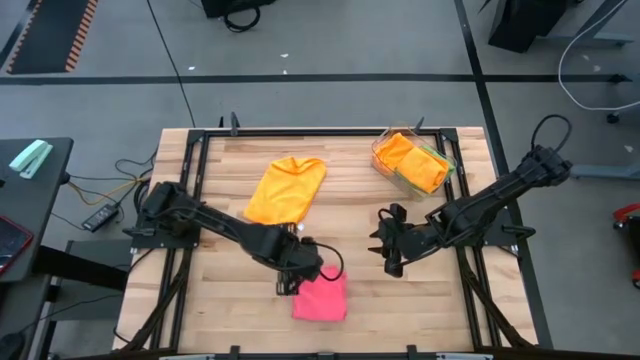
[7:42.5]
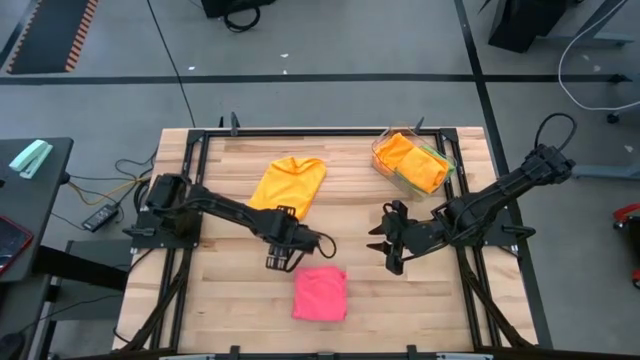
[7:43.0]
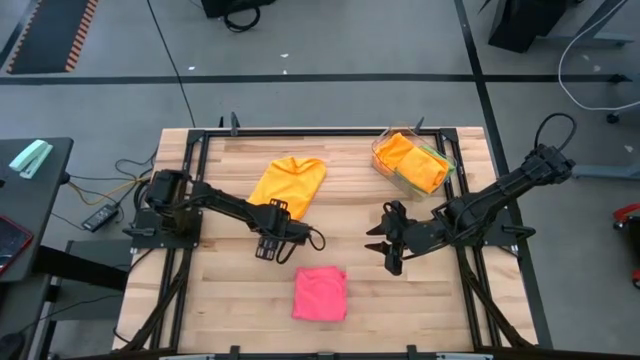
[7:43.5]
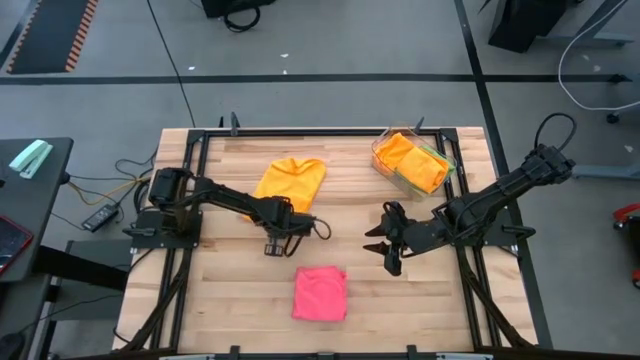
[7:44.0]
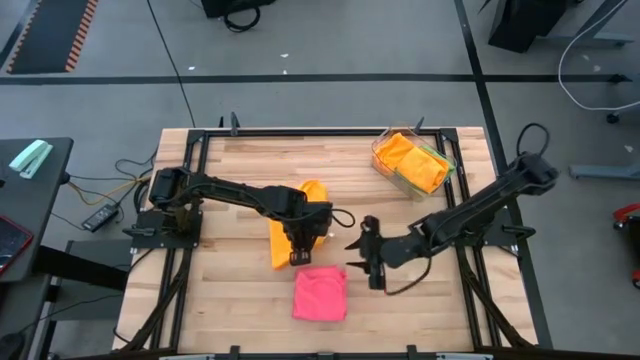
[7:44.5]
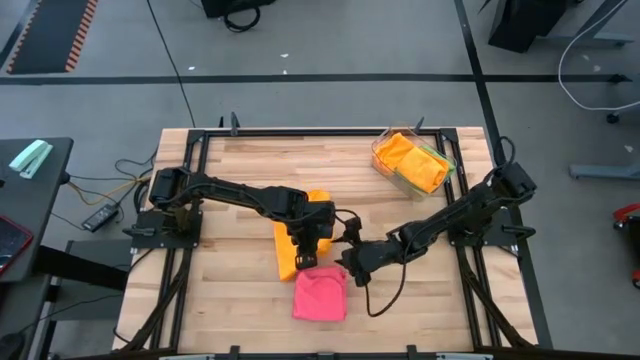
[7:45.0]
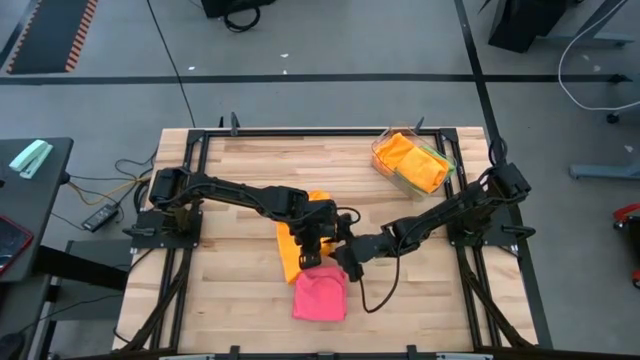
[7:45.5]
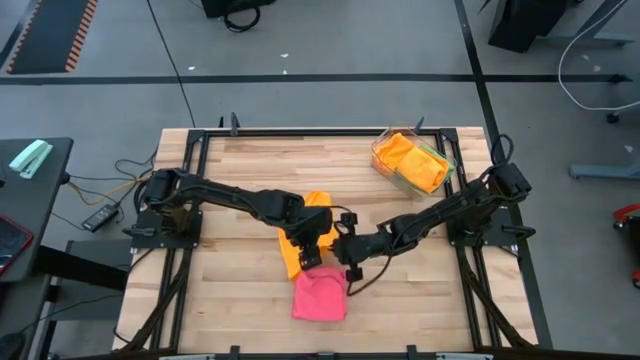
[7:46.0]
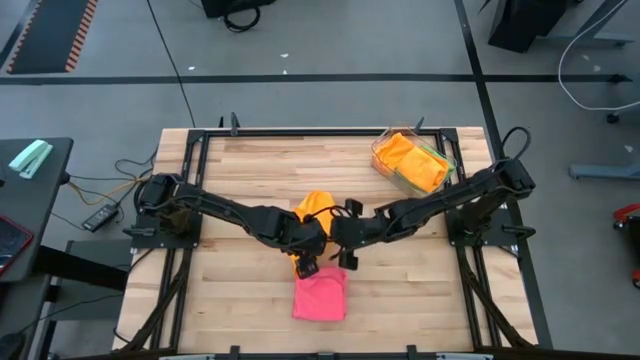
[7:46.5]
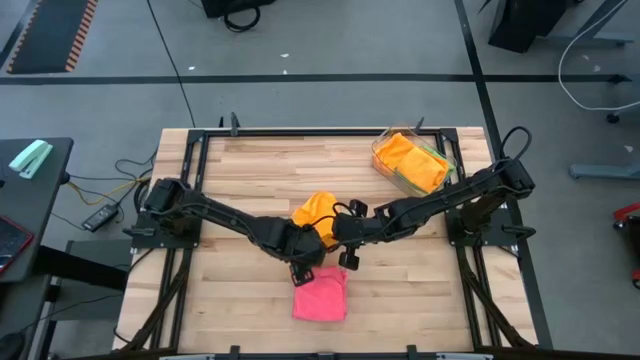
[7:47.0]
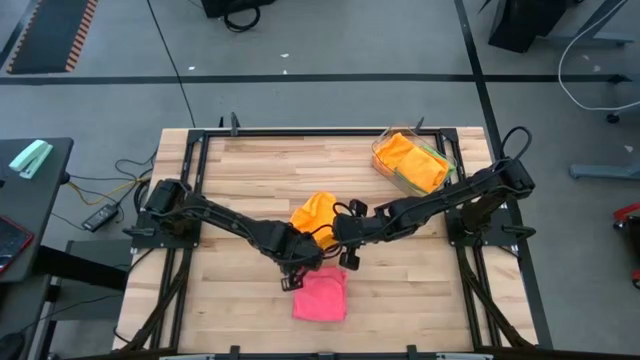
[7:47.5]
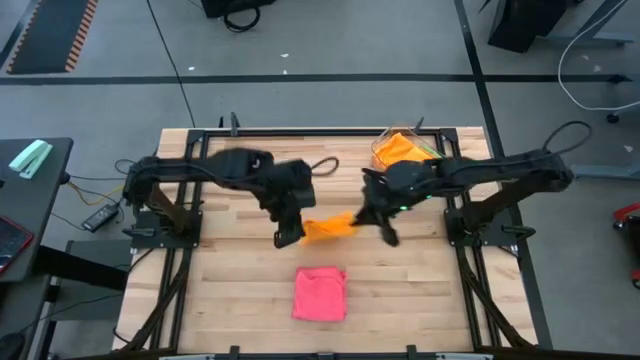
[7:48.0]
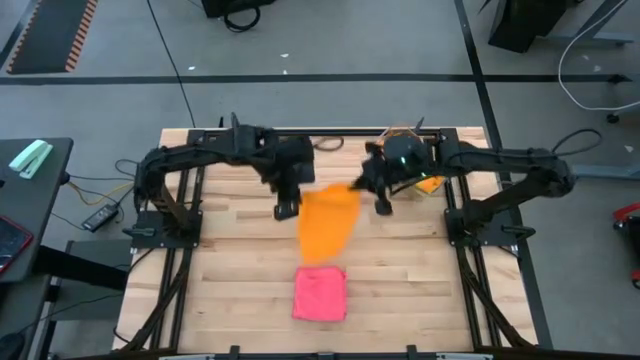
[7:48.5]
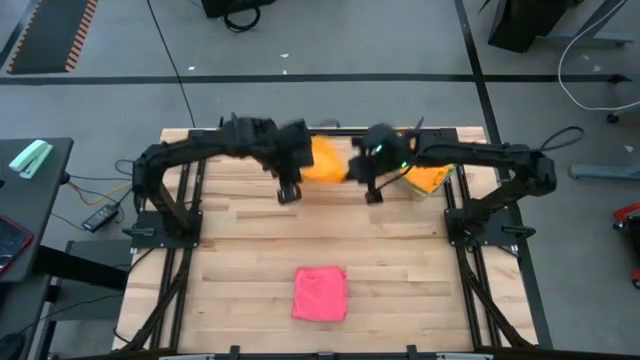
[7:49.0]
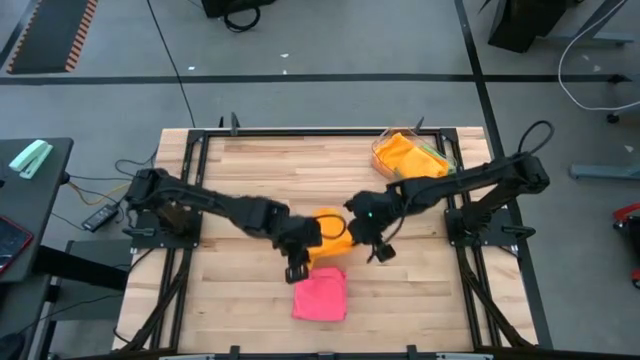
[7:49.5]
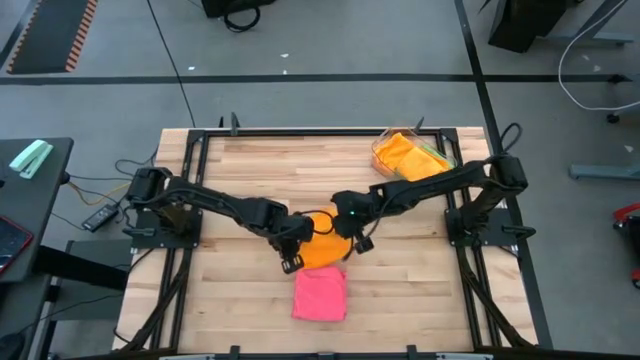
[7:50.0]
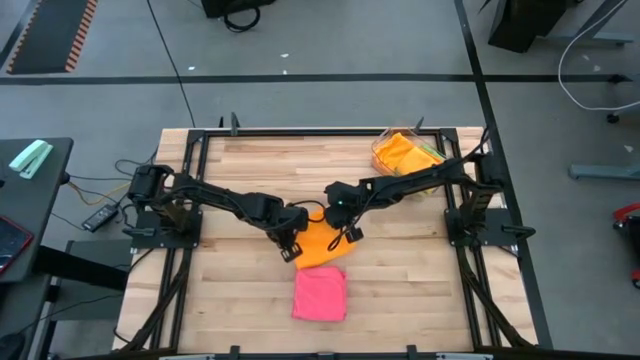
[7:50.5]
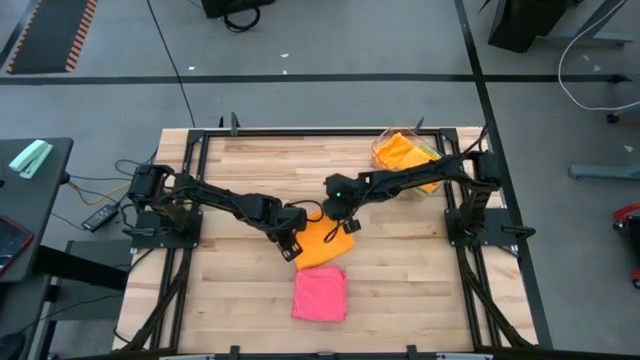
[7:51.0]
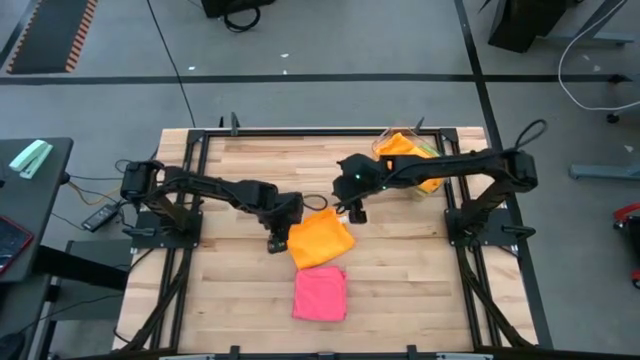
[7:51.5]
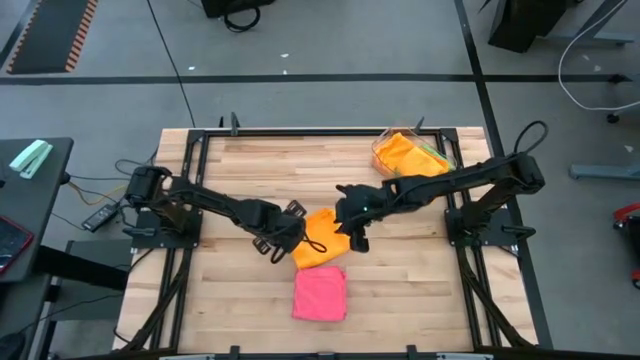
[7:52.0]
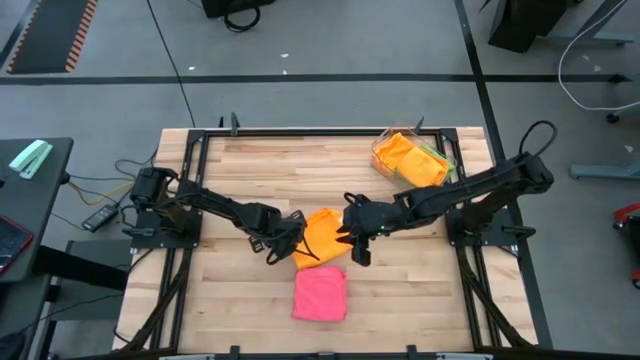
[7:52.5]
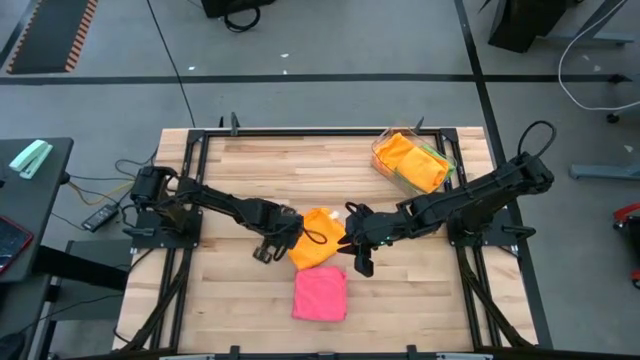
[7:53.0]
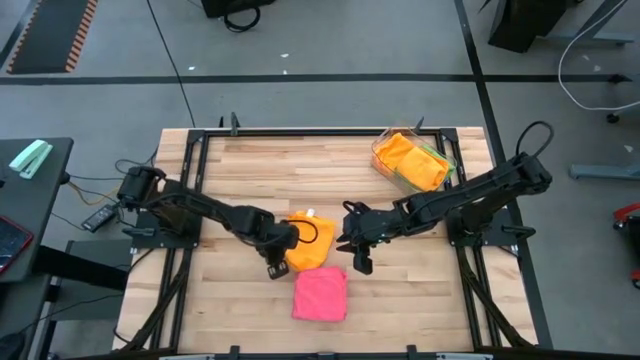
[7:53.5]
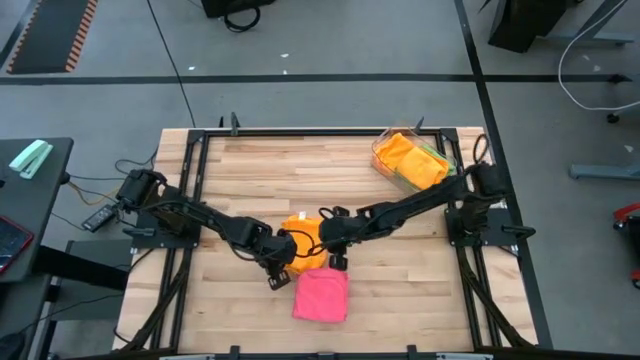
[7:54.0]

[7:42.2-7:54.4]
Task: Fold microfiber towels
Fold the orange towel

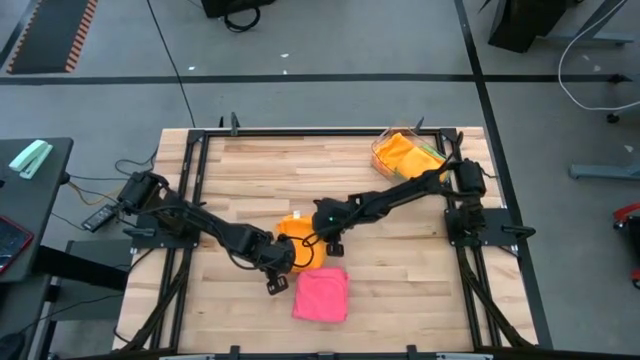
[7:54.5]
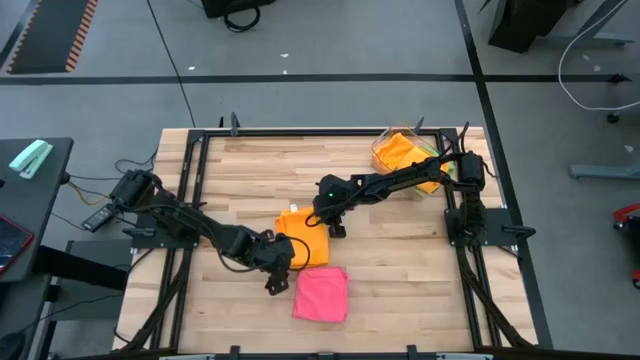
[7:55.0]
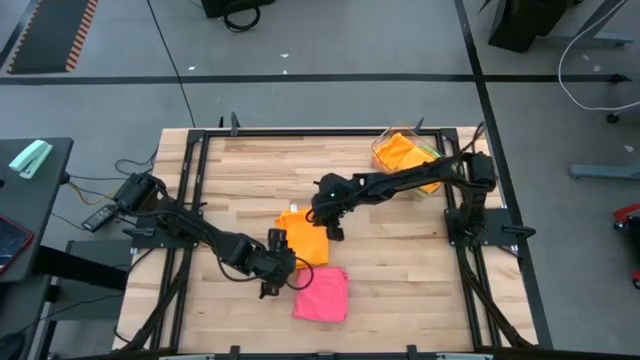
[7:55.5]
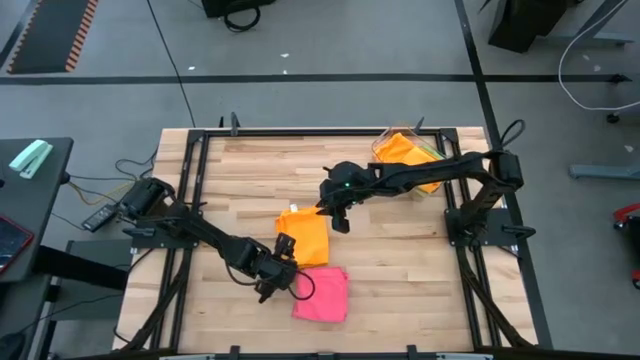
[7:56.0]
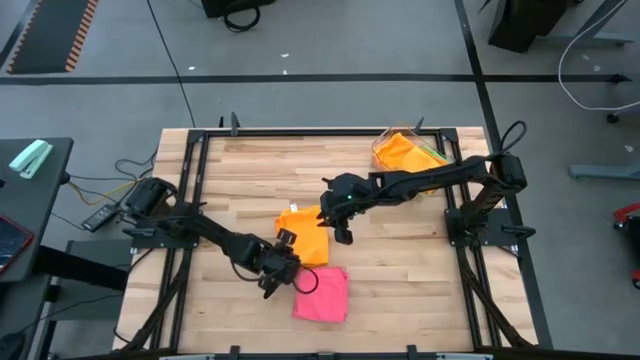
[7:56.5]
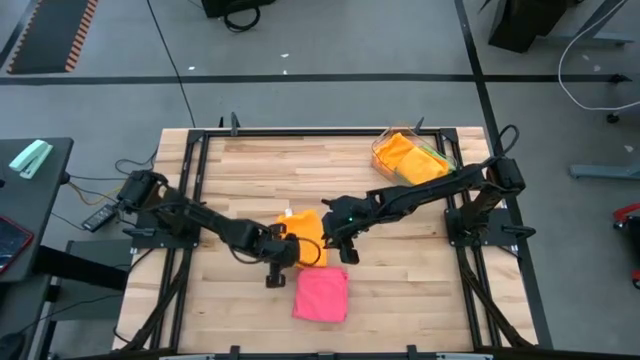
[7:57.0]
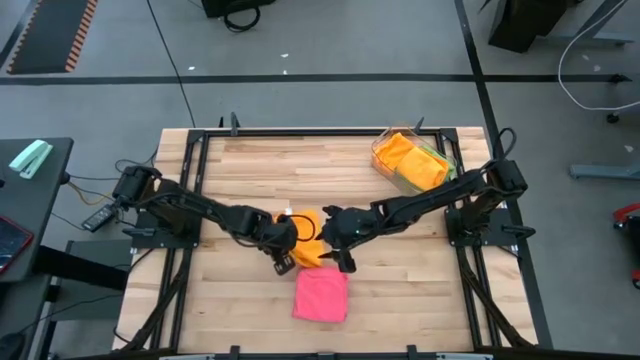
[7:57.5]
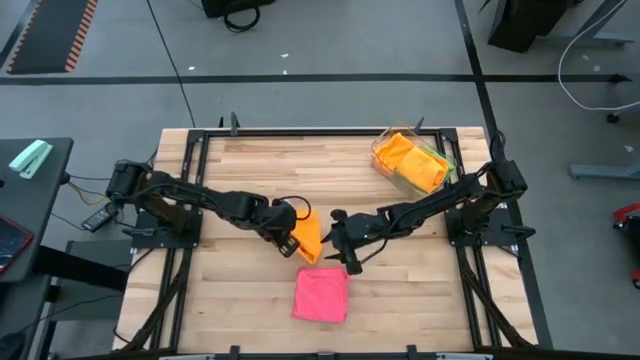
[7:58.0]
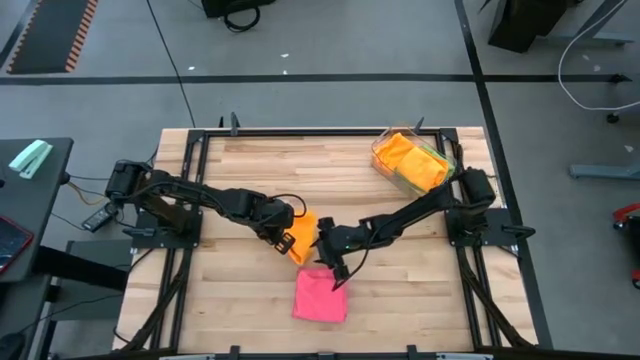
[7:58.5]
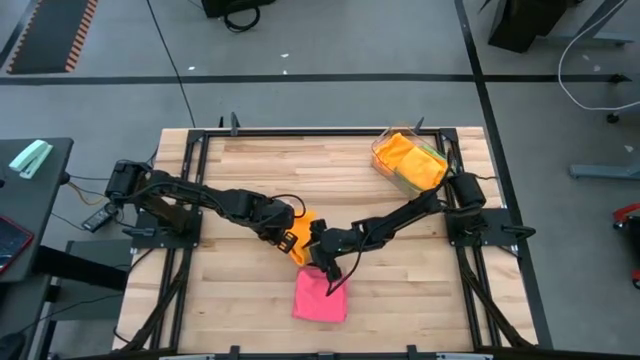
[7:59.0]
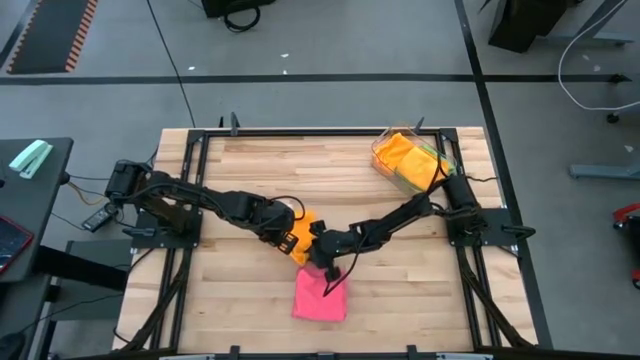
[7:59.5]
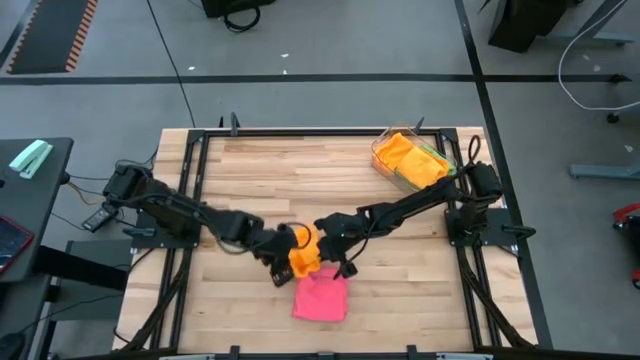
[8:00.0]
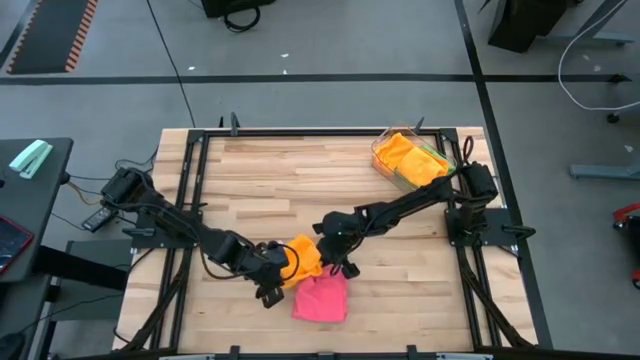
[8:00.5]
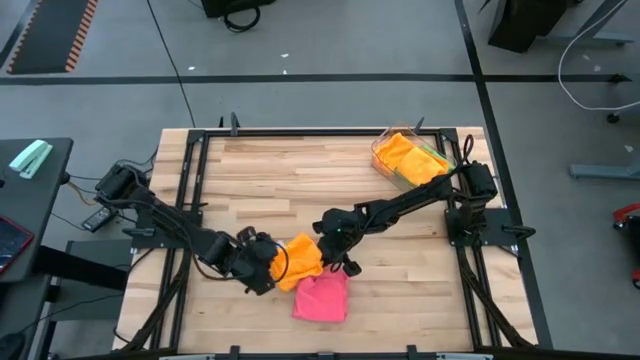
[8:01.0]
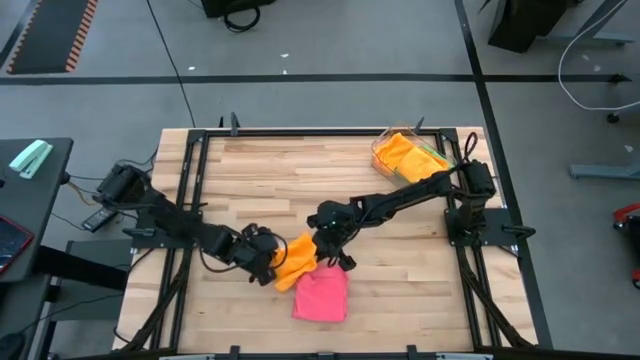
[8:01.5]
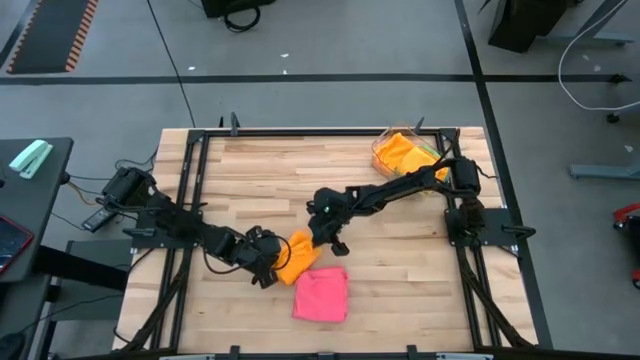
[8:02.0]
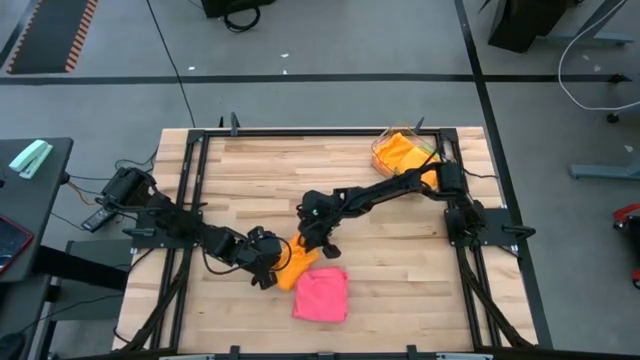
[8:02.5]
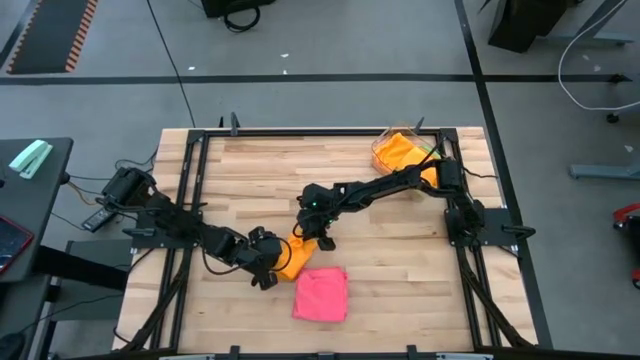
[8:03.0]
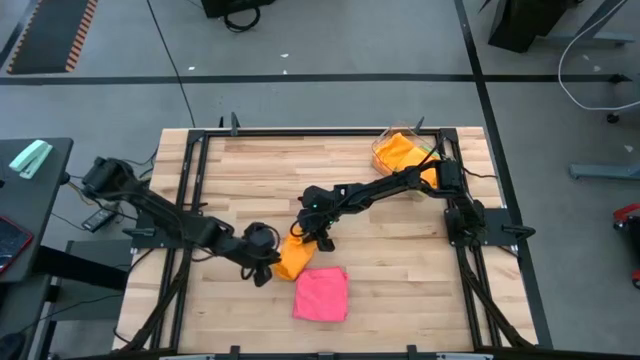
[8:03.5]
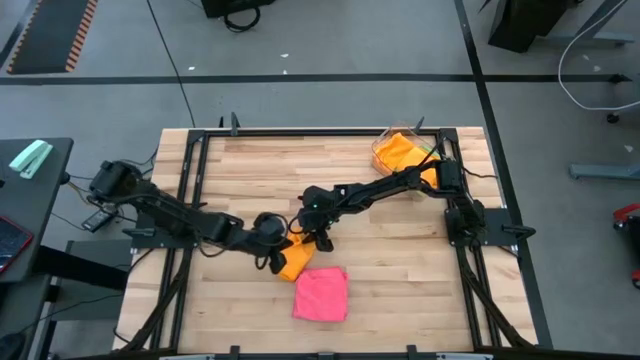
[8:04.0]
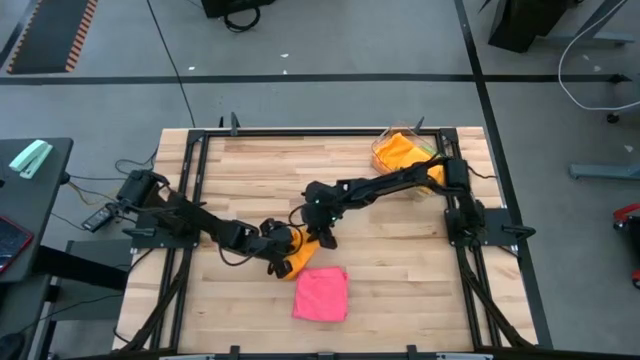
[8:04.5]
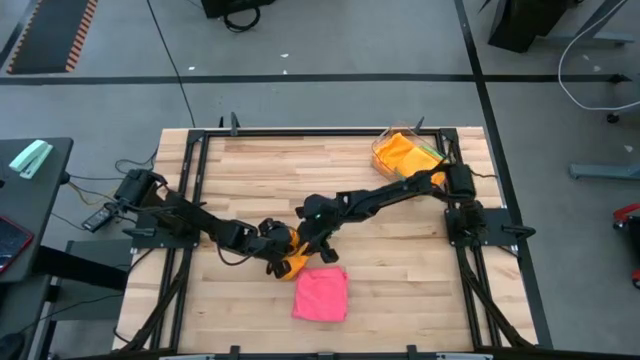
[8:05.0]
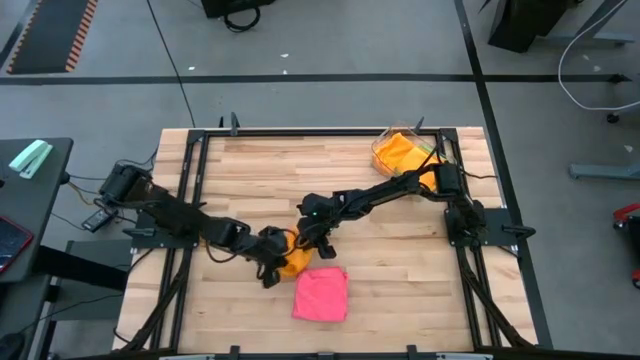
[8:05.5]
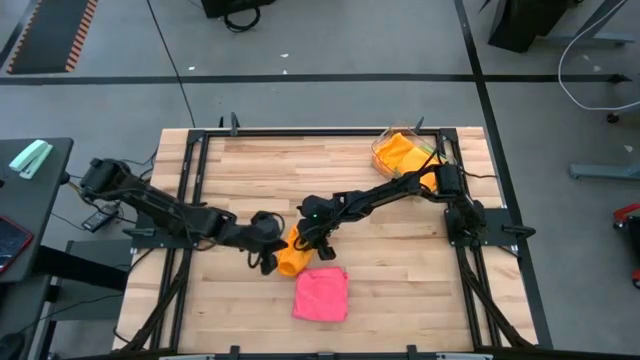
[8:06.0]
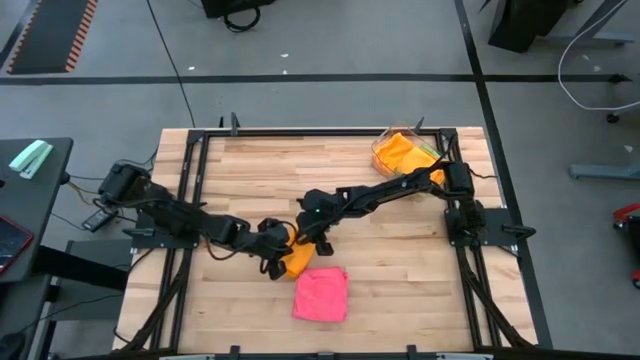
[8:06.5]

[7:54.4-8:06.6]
Fold the orange towel
